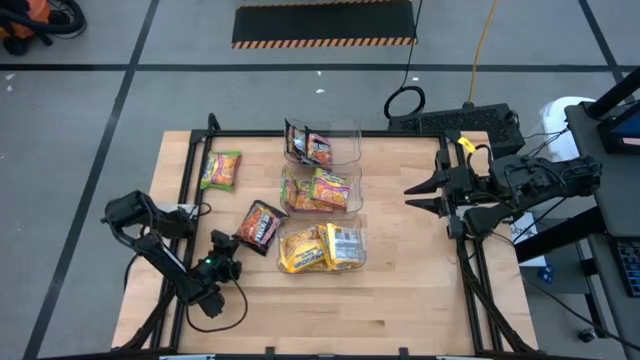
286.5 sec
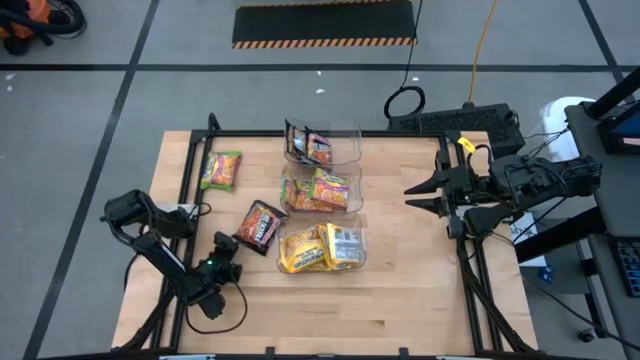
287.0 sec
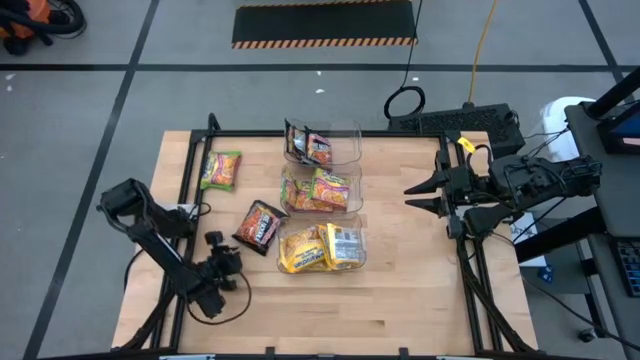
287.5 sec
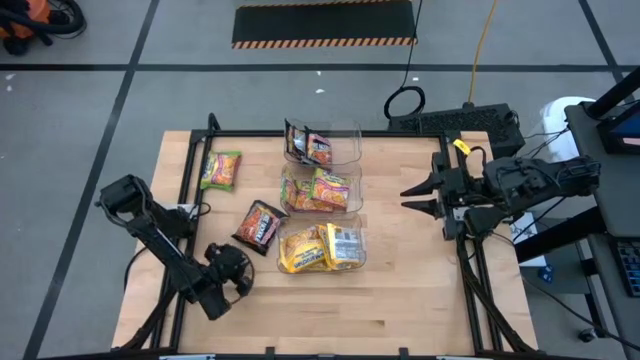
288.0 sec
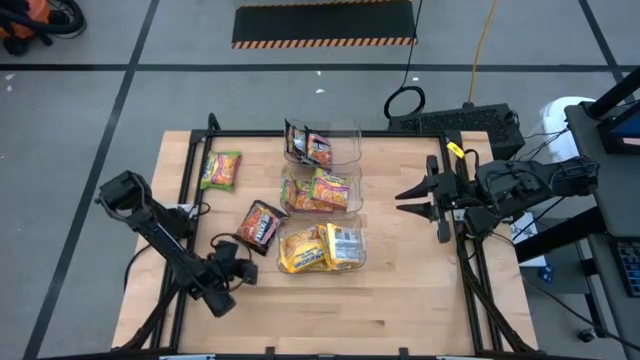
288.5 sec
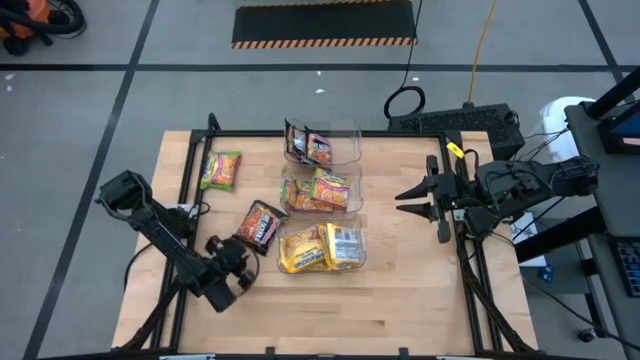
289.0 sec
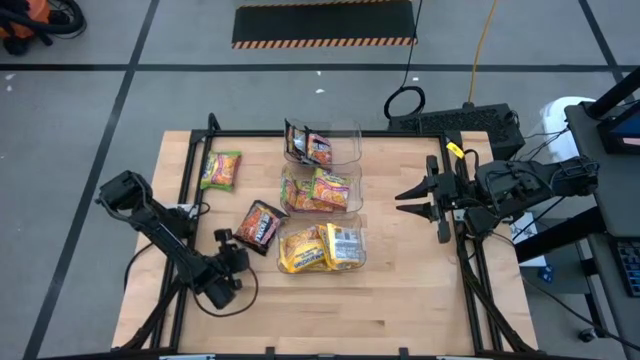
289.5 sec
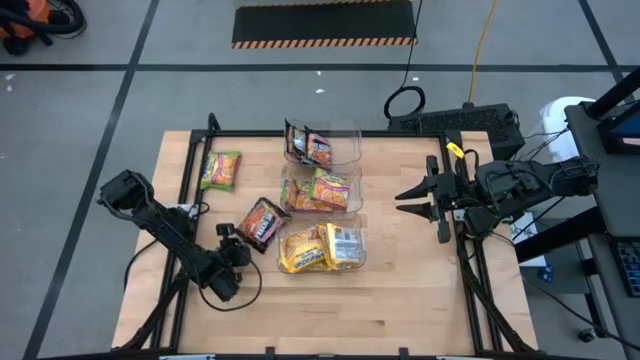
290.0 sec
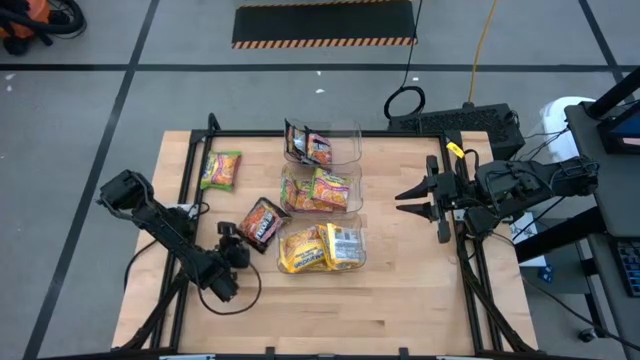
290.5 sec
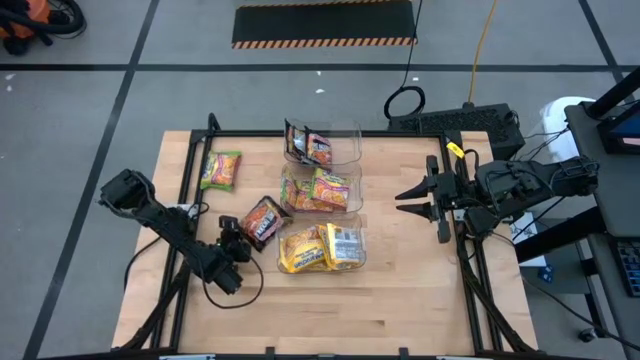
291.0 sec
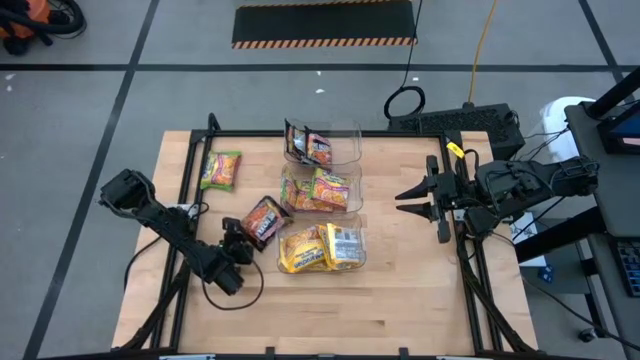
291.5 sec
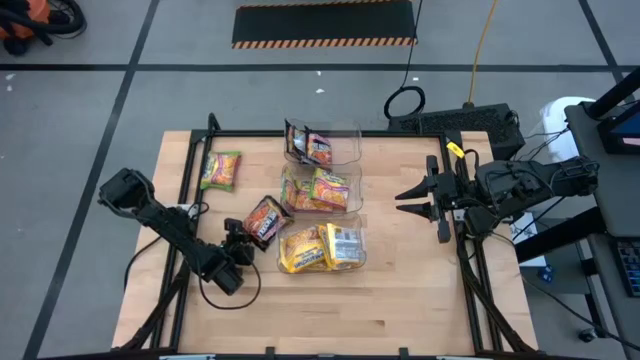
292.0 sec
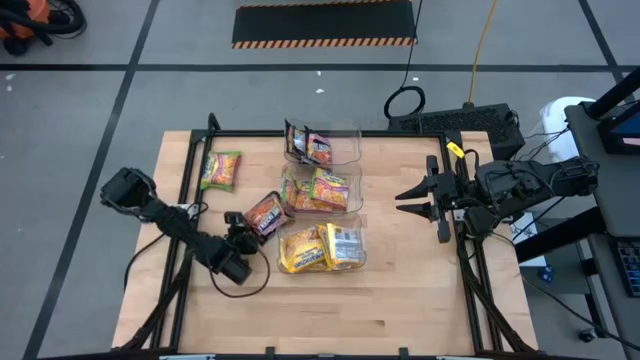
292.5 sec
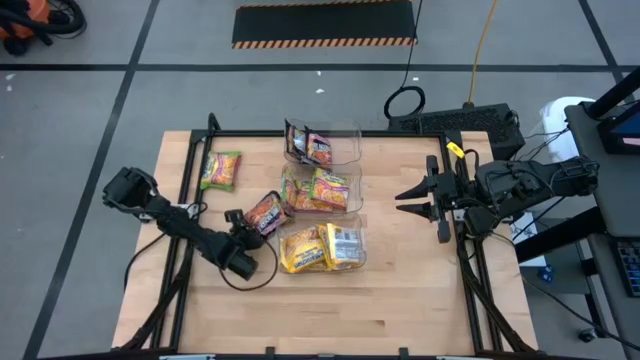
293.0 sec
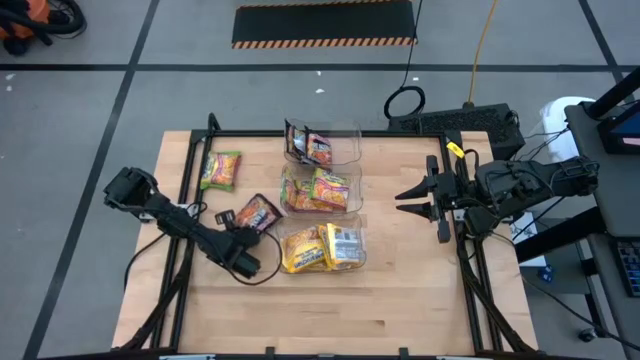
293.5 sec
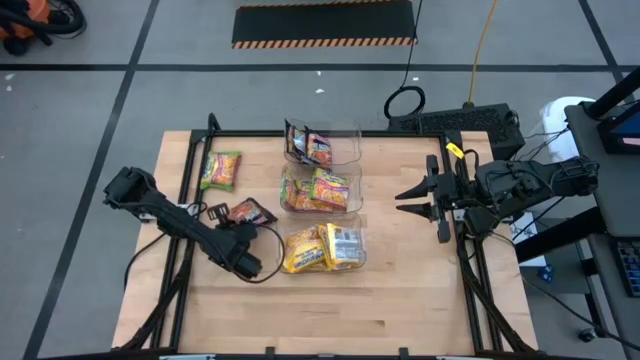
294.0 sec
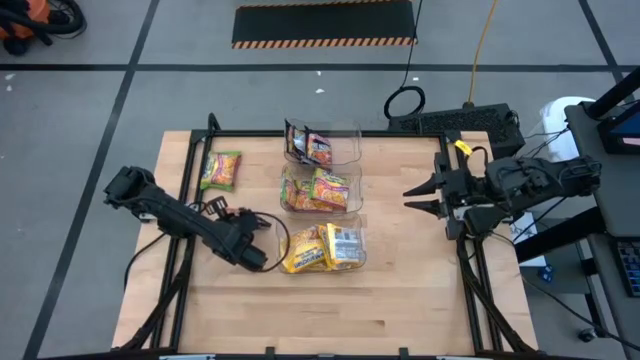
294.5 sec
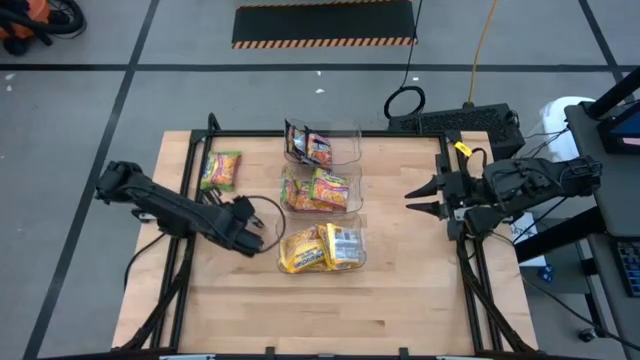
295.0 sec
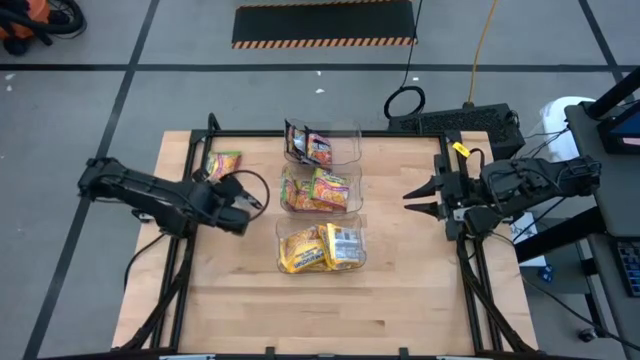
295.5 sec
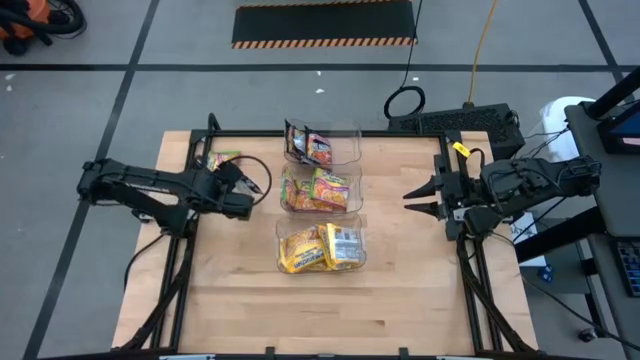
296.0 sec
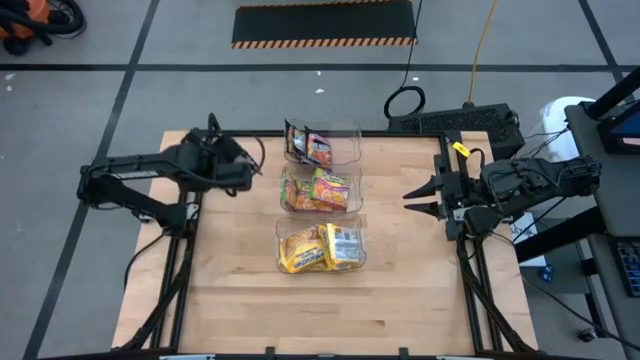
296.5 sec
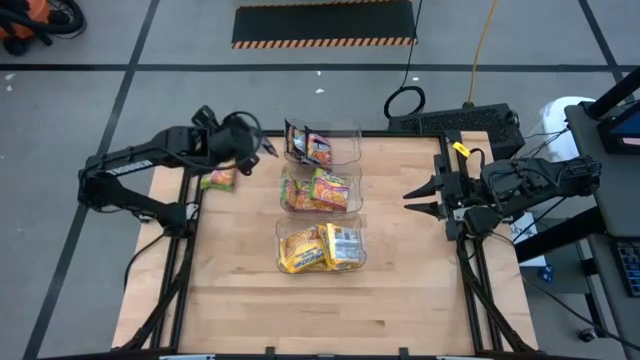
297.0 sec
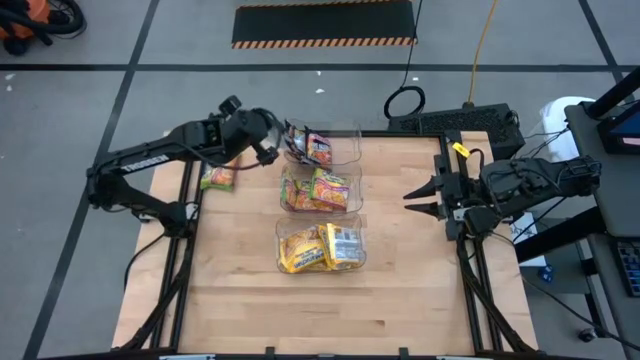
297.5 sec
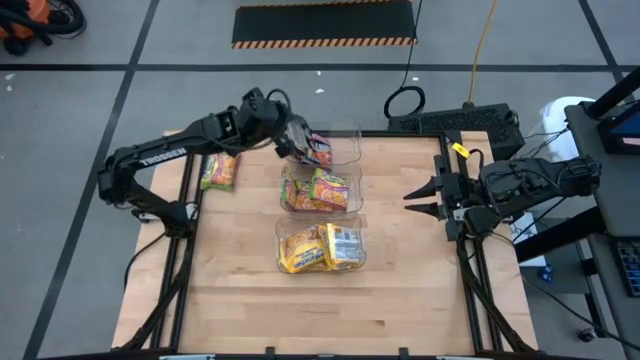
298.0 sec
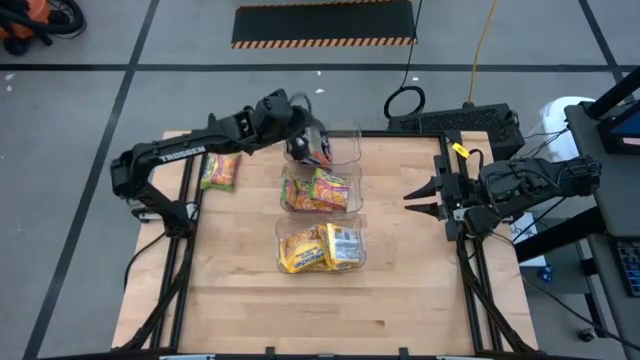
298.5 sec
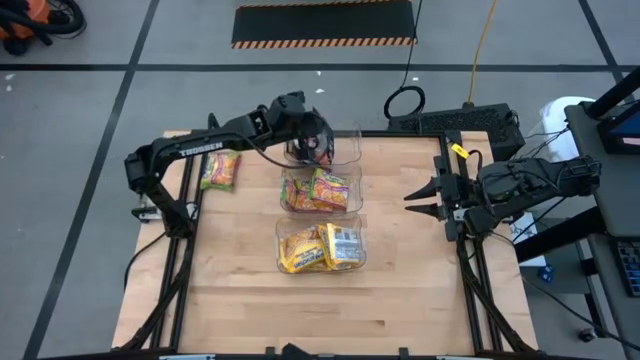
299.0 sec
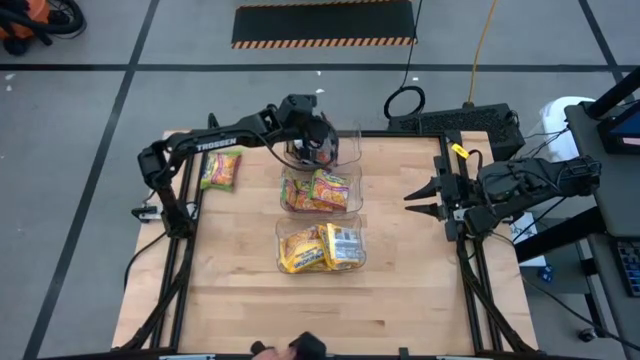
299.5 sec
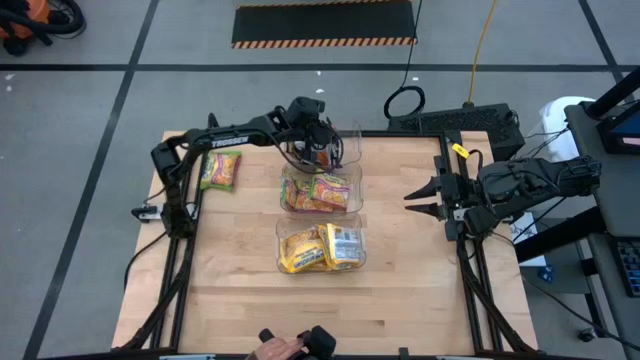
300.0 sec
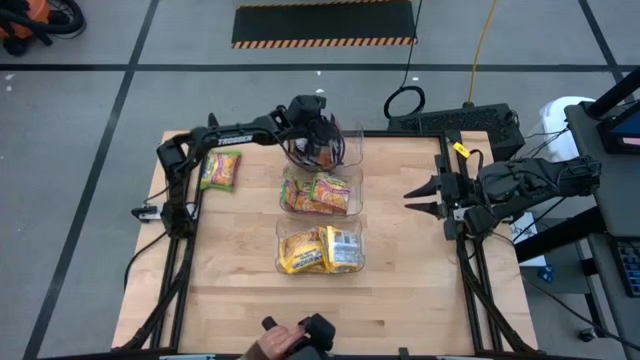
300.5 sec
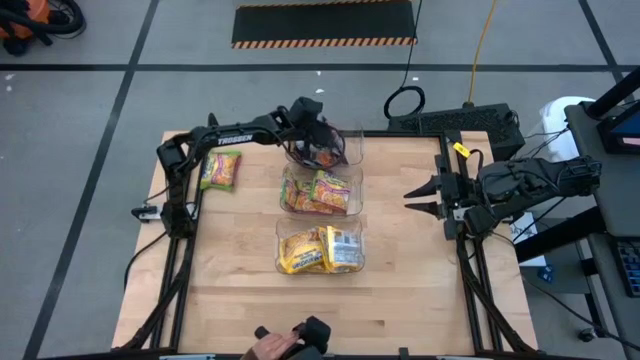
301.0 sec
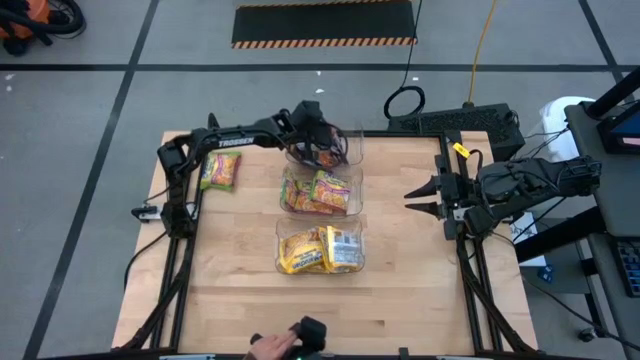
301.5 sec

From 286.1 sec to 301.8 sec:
Task: Sort Maruchan noodles
Put the black noodle pack into the top transparent bin

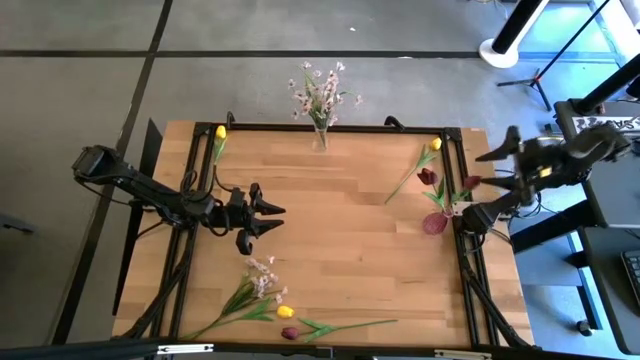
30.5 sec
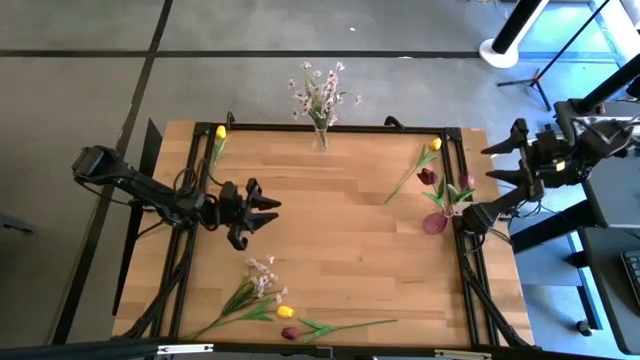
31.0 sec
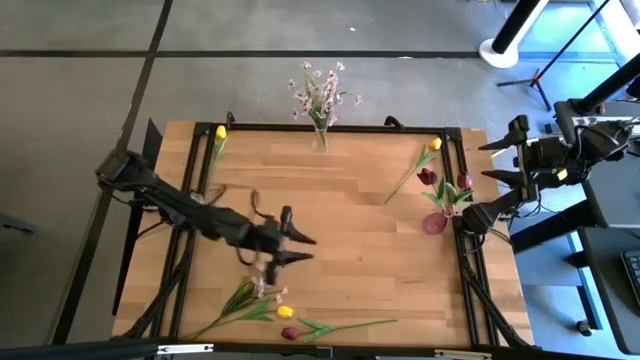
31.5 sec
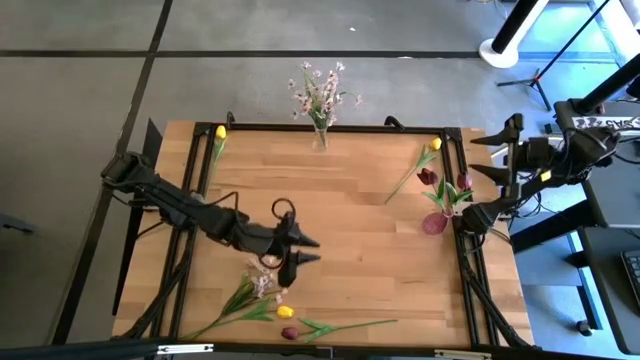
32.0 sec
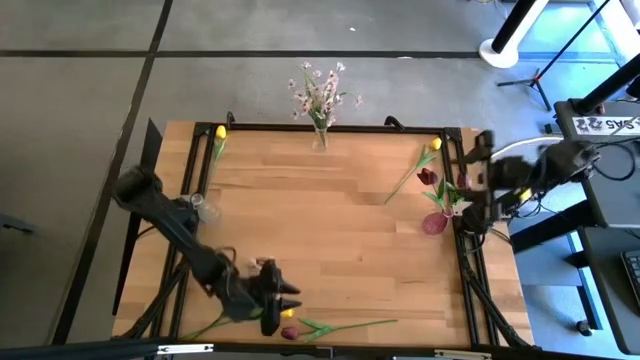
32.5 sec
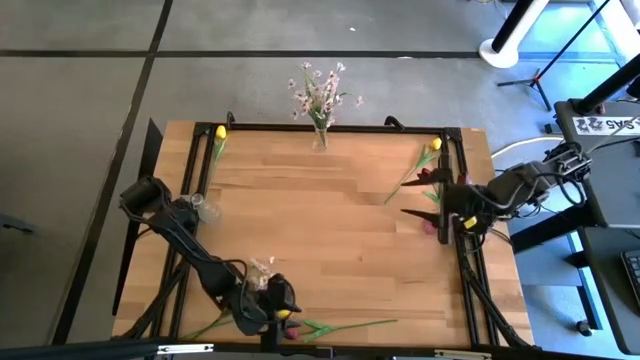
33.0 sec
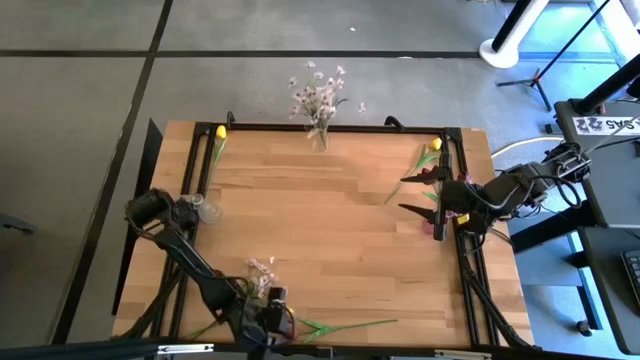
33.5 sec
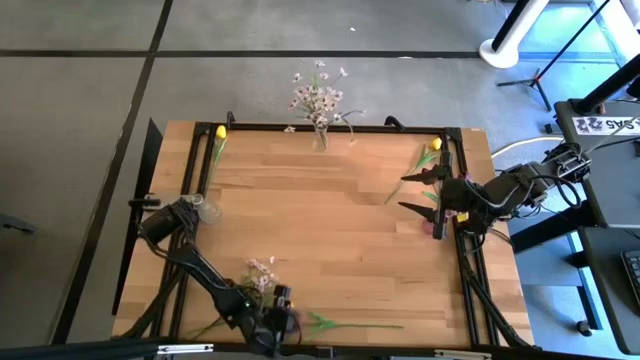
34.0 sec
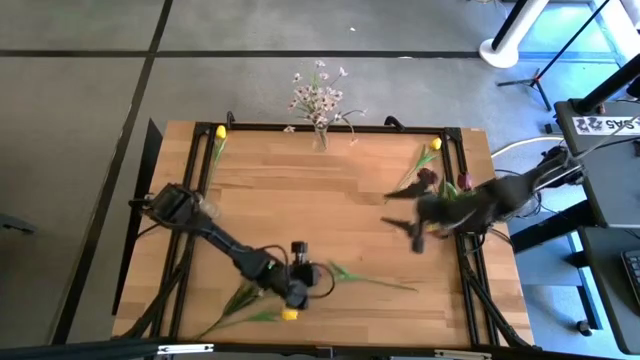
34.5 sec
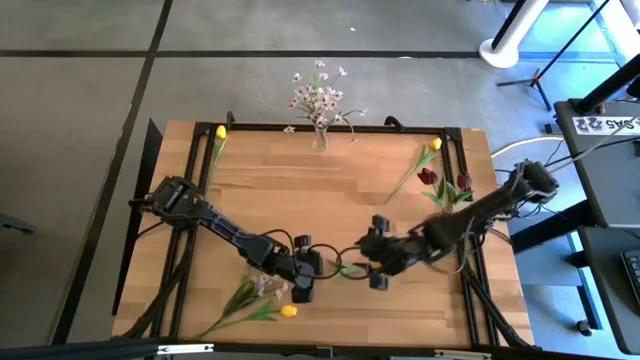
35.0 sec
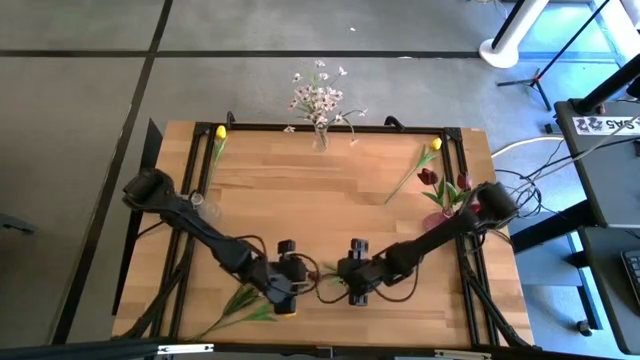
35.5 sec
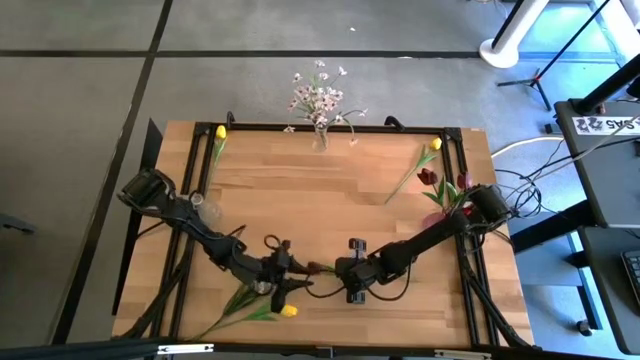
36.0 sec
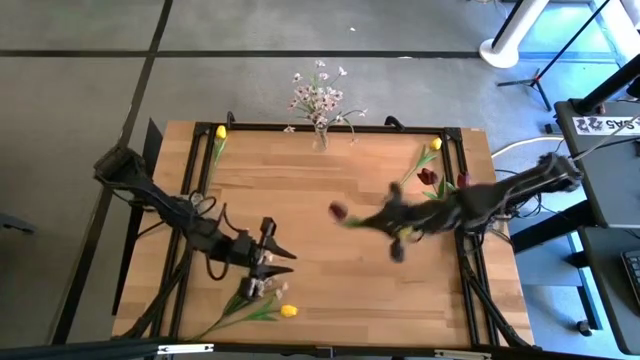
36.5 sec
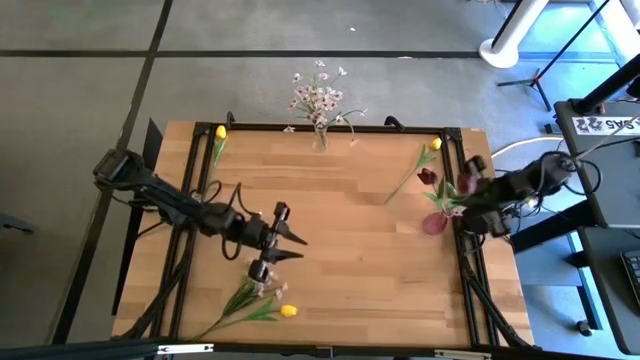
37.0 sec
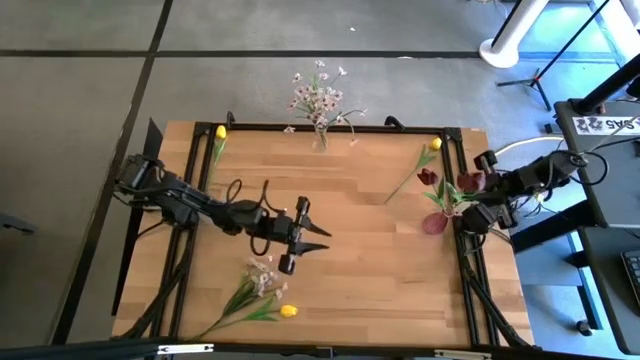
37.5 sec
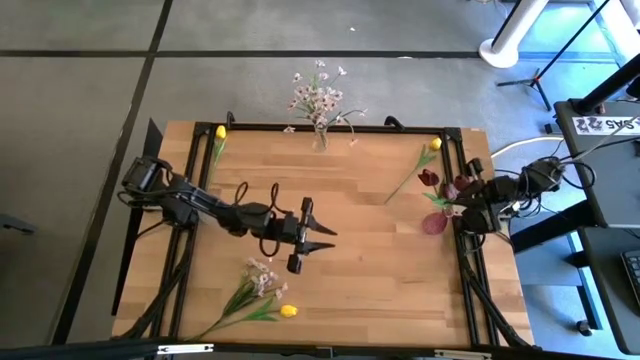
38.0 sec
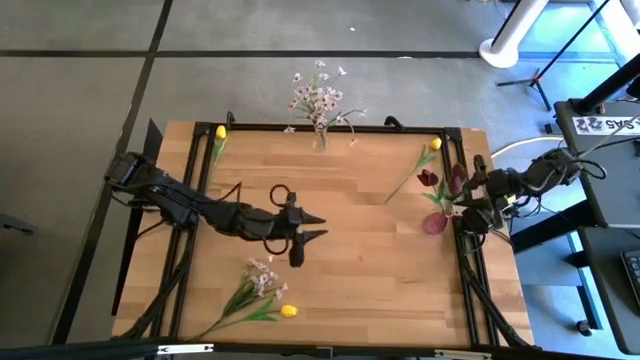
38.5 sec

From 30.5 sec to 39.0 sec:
Task: Sort flowers into vase by color
Put the red flower into the purple vase
